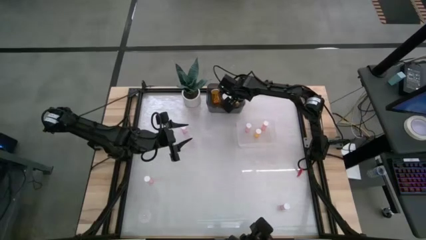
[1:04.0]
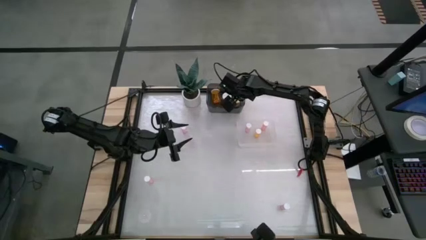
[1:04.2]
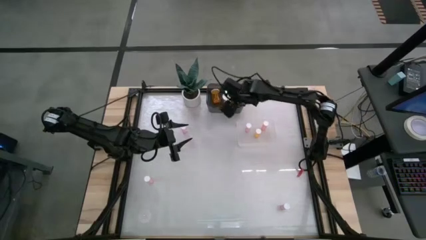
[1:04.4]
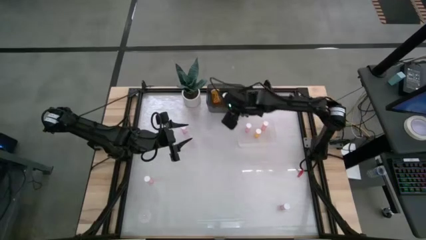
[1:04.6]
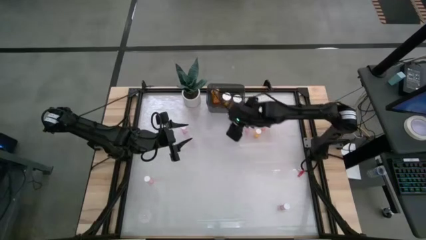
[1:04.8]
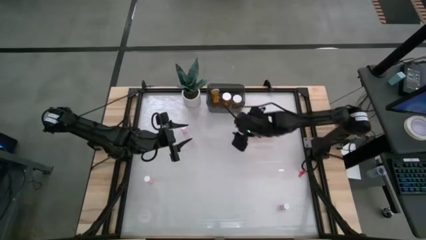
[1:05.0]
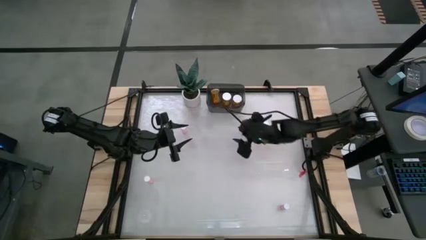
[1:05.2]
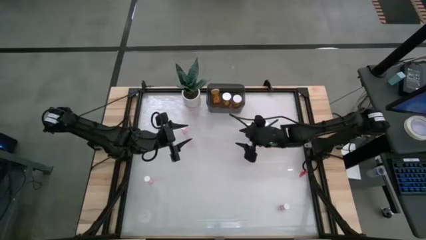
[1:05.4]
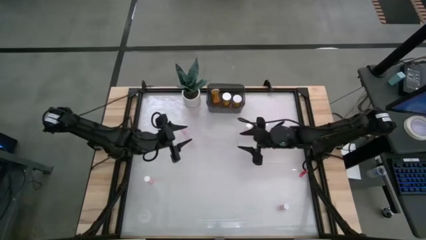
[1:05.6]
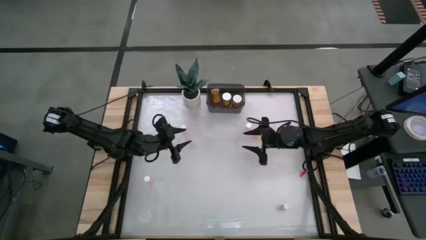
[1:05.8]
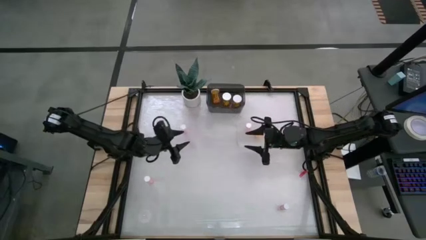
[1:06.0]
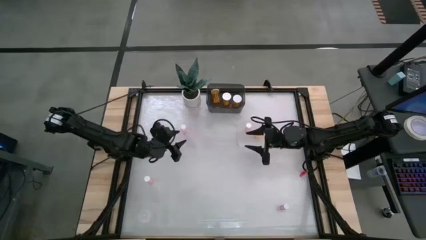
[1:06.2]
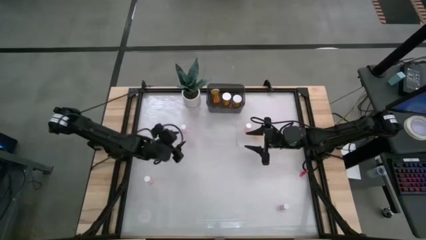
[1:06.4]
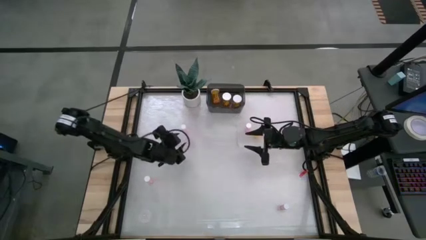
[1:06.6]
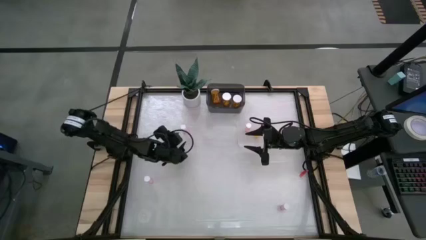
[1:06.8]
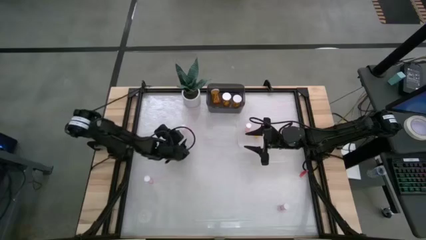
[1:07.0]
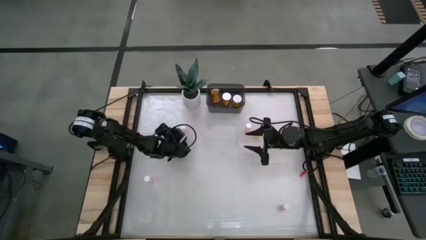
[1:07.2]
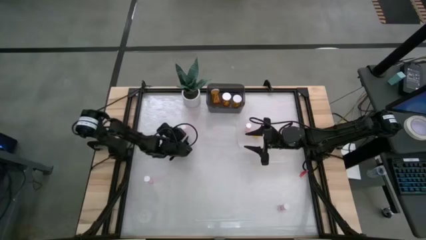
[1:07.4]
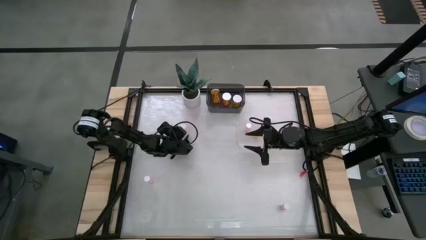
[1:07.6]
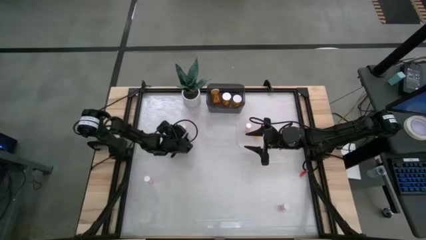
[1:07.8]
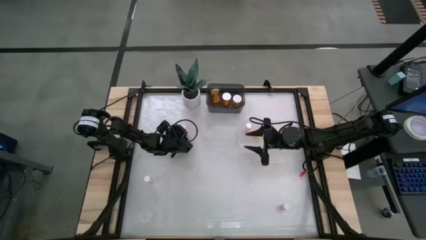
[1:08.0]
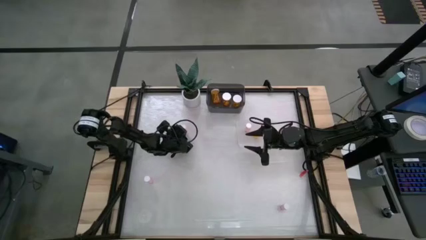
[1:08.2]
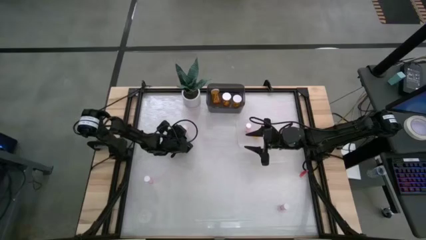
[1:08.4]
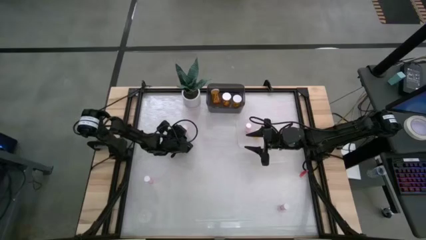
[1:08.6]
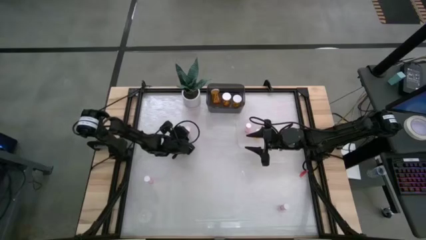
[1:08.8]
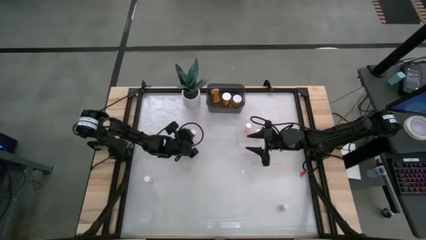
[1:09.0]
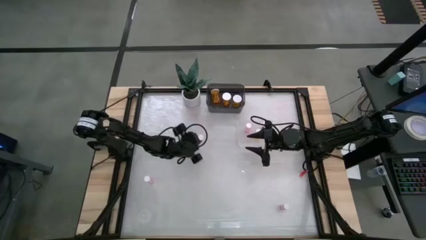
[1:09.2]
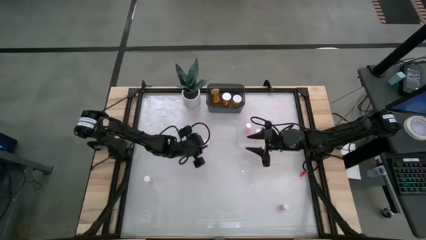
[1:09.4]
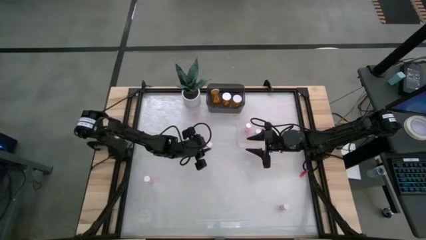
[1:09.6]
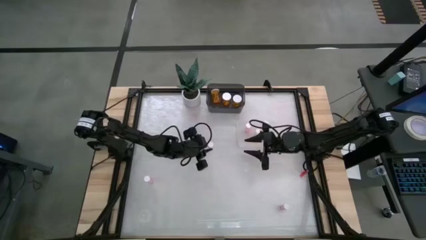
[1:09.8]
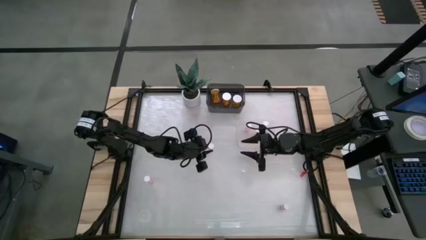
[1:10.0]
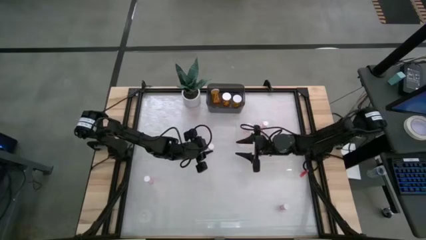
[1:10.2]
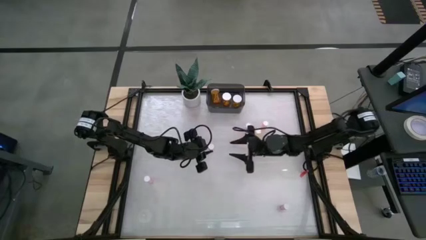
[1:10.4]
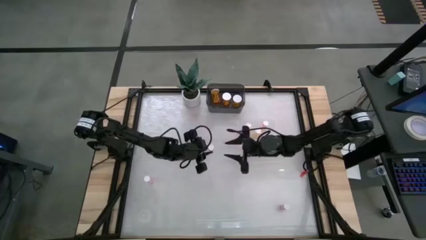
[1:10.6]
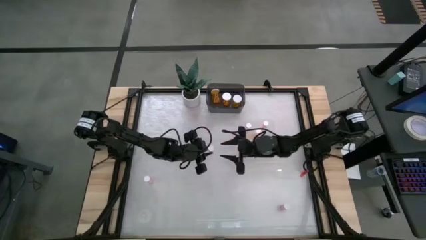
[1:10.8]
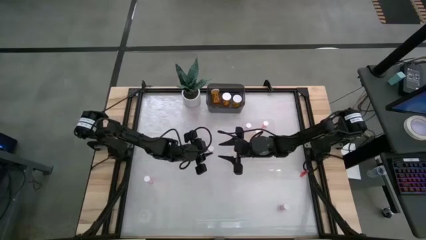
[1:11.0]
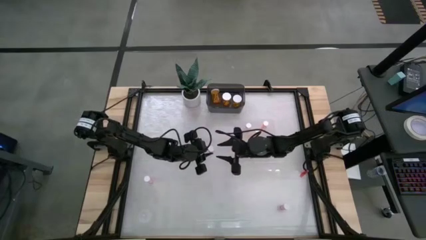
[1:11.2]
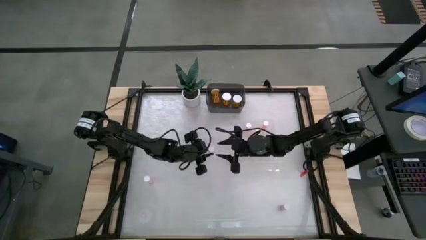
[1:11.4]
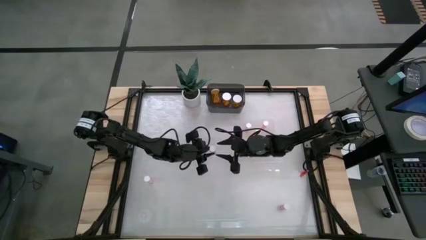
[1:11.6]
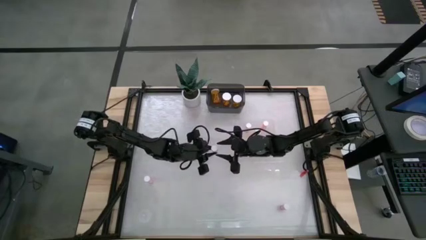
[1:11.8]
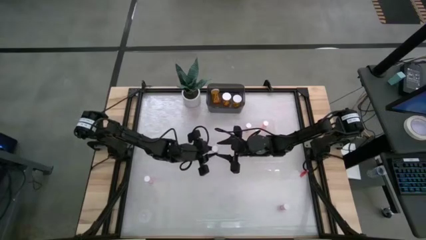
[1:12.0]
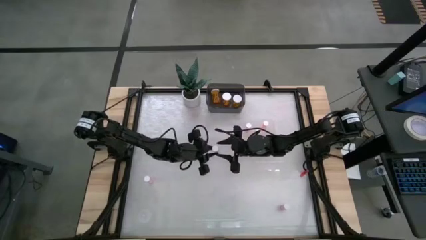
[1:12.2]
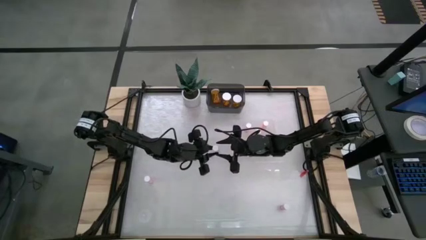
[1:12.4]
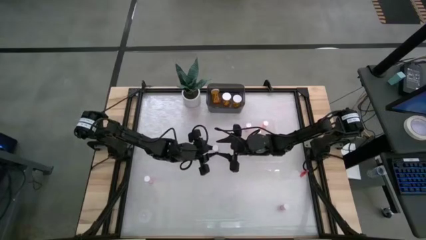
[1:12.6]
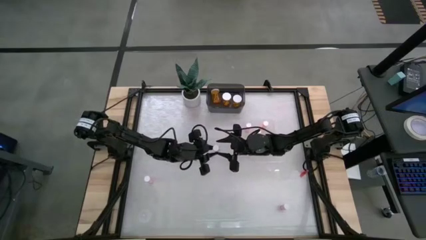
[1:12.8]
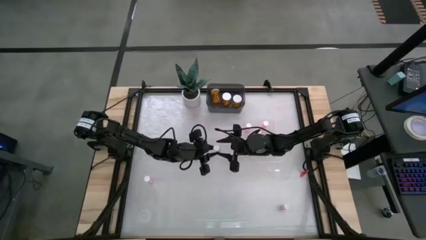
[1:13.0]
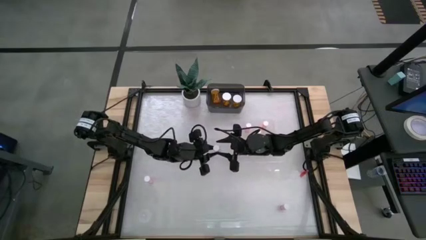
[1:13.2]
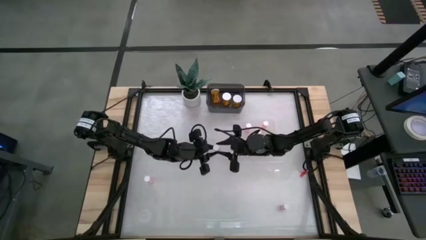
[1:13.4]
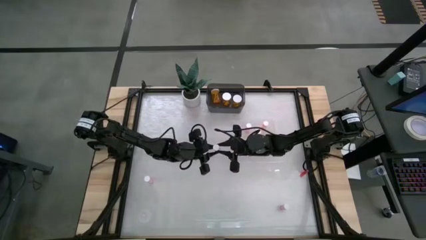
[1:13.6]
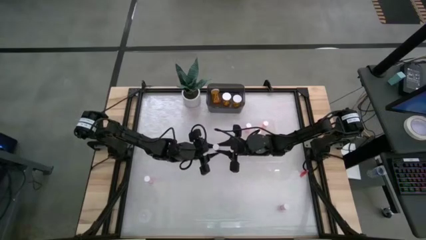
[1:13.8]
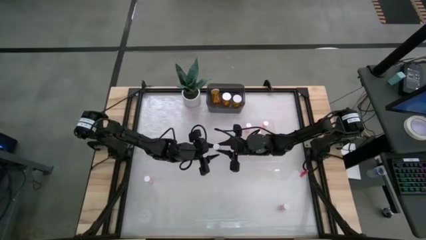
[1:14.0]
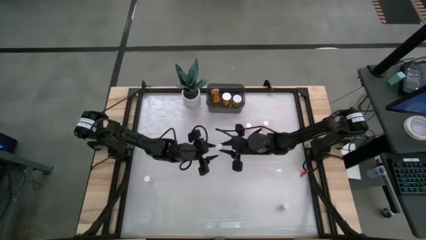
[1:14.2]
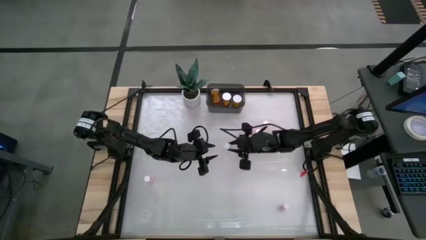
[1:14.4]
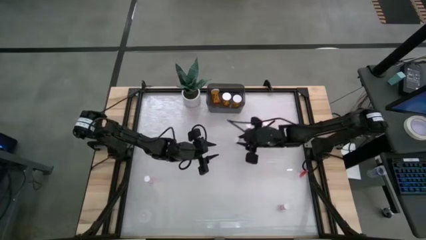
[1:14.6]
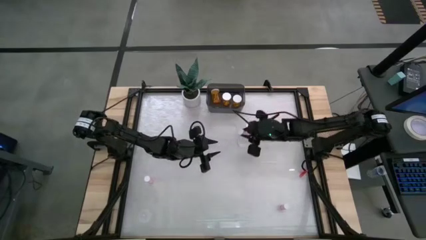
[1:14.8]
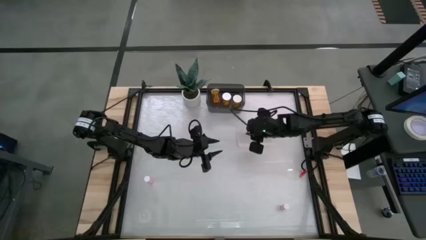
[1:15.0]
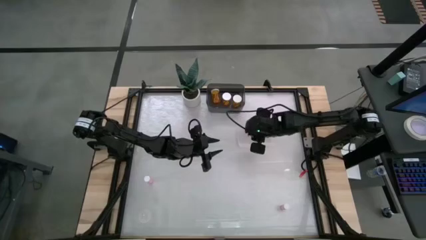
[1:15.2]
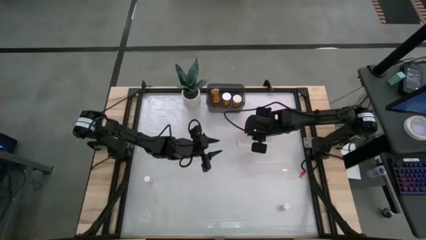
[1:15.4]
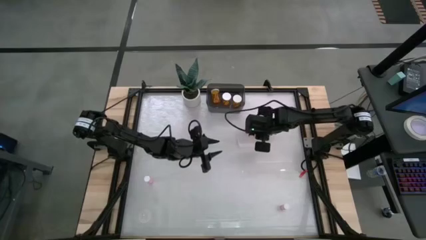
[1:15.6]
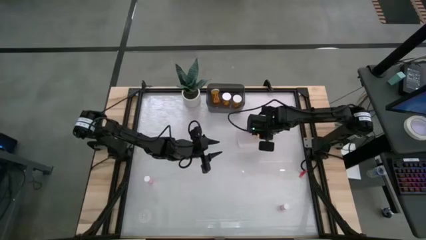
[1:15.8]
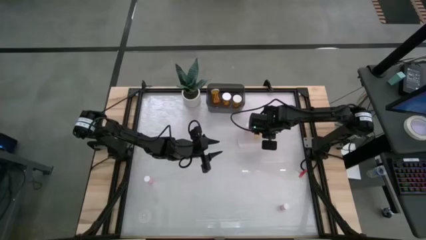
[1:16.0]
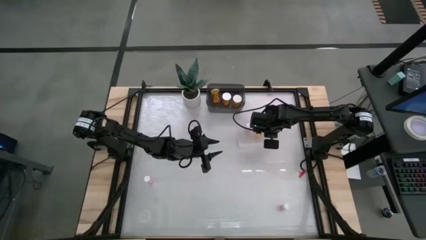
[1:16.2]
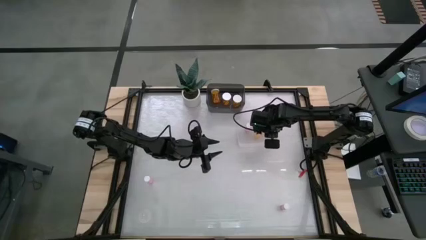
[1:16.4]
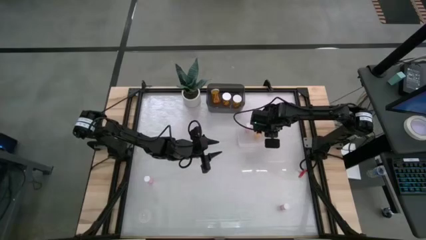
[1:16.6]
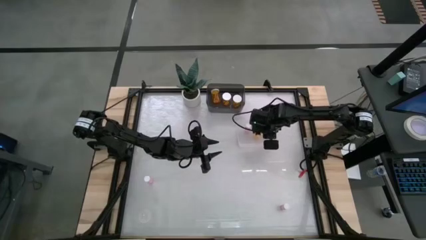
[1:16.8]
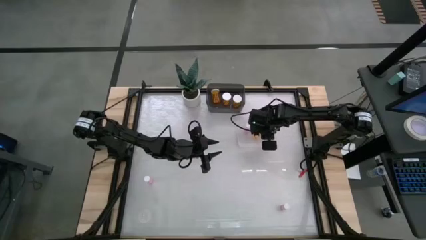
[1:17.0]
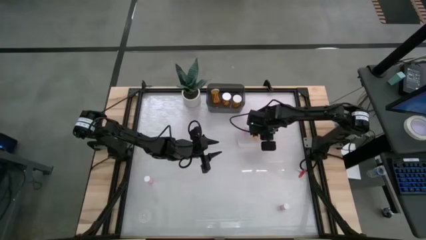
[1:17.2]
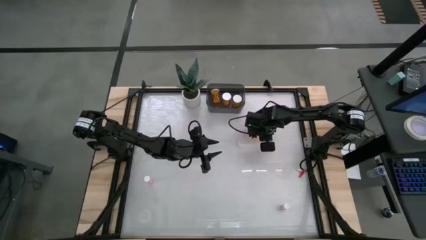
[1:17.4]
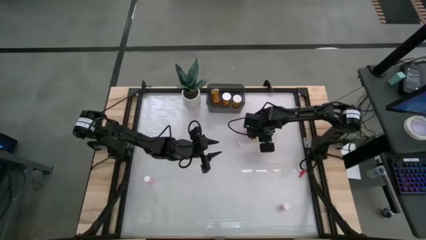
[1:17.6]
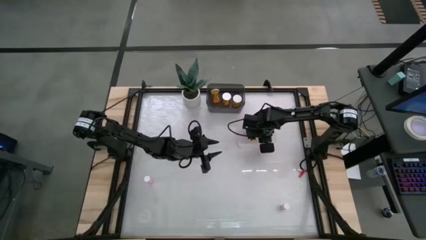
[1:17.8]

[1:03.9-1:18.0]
Task: Pick and place medicine bottles into bin by pill shape (circle, oval)
Put the small pink pill bottle into the white bin

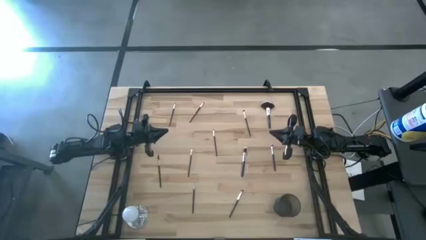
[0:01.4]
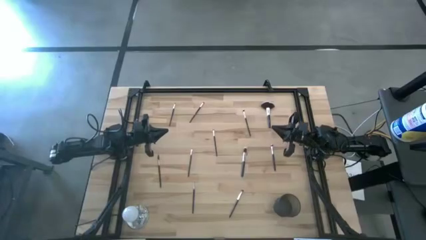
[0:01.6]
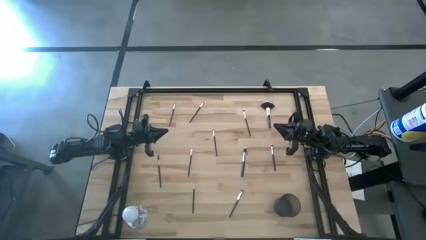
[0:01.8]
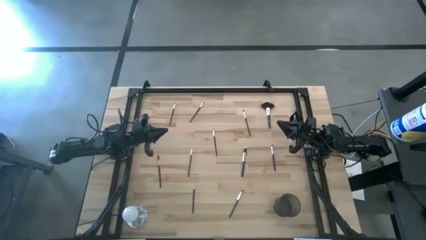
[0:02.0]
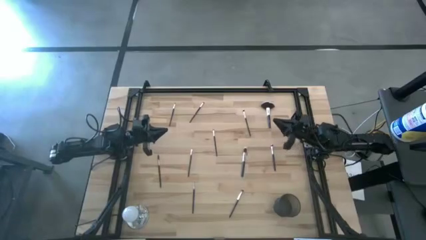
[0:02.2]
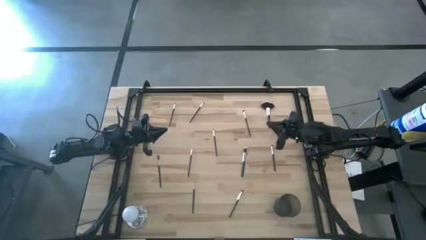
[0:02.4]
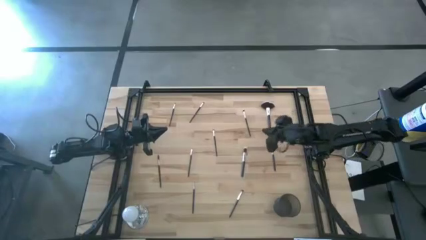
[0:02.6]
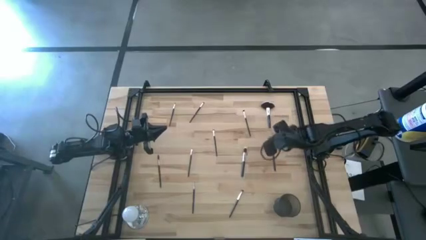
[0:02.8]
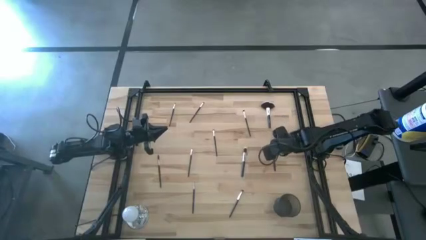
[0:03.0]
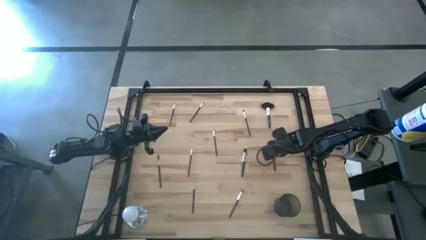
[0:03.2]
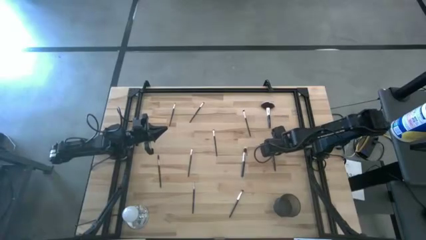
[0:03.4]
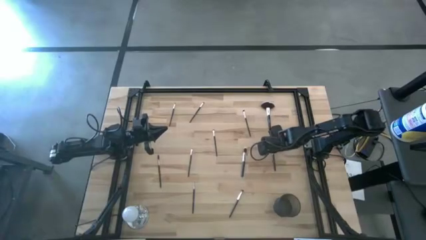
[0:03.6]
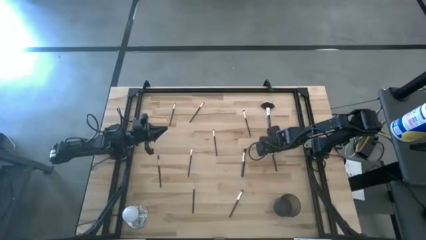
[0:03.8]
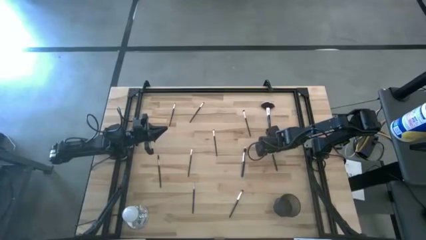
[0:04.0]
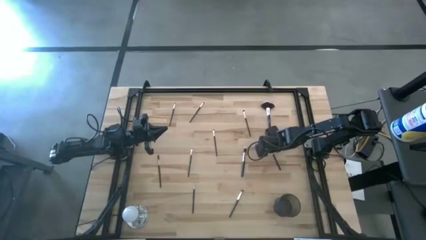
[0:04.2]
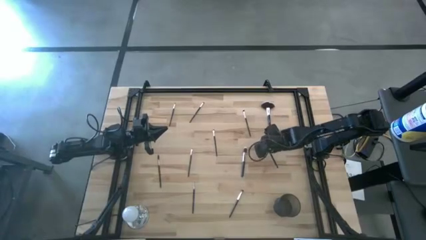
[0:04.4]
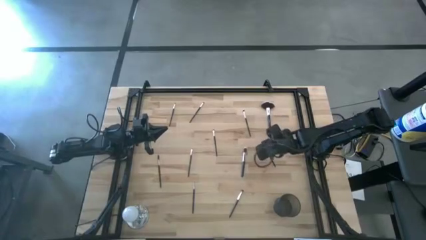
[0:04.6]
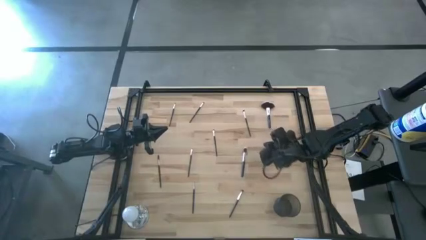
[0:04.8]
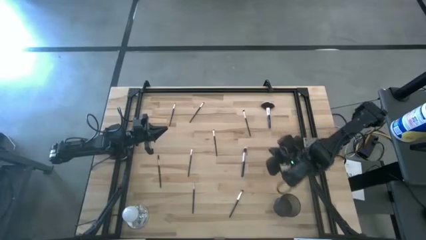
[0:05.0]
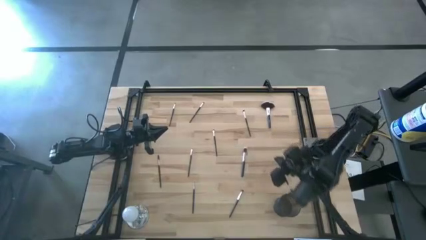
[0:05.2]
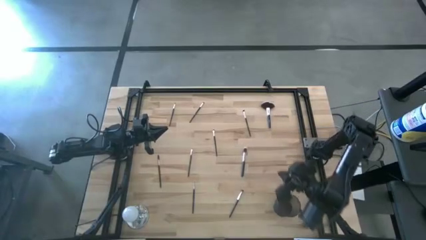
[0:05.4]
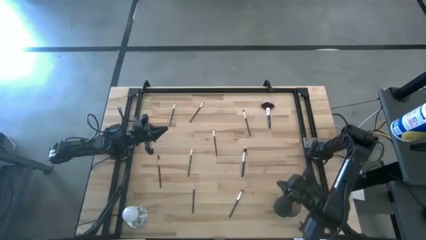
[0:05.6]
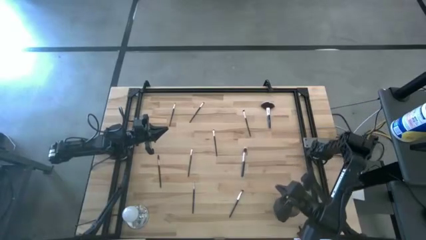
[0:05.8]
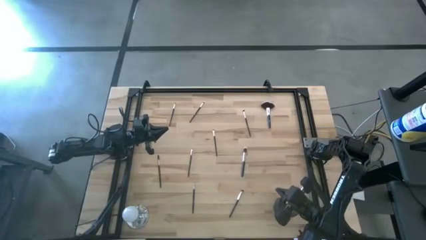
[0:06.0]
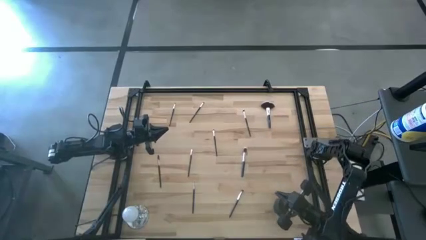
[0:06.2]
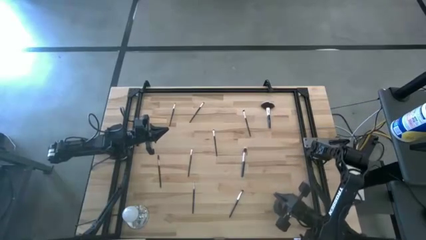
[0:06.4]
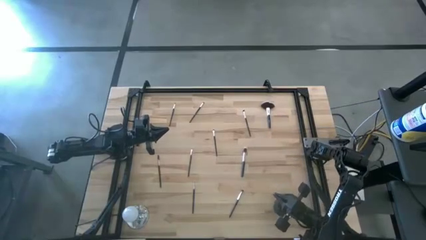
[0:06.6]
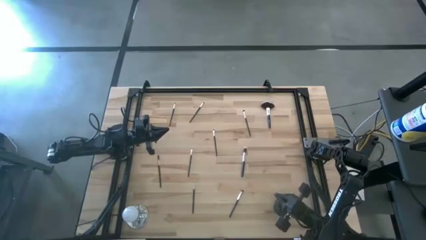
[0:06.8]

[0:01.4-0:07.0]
Task: Sort items
Put the medium angled shader brush into the wire basket
